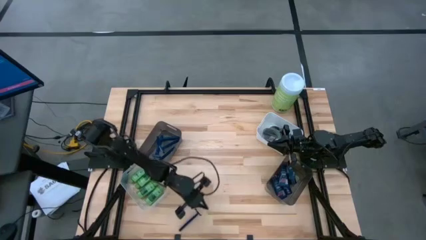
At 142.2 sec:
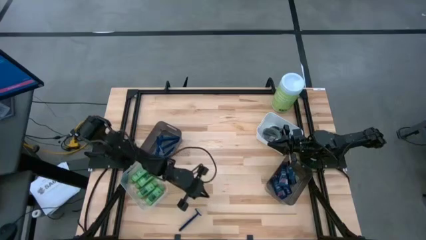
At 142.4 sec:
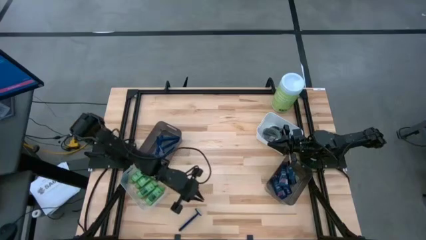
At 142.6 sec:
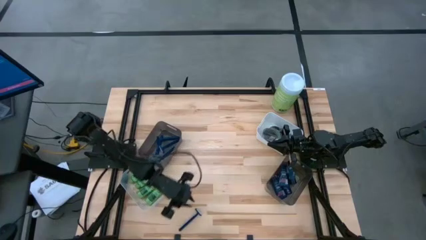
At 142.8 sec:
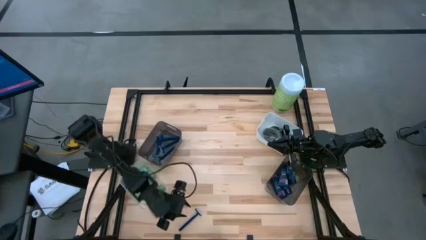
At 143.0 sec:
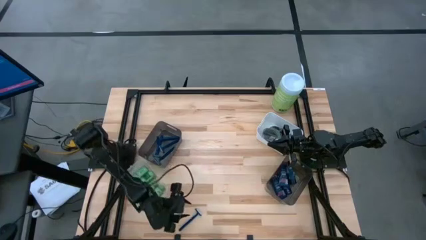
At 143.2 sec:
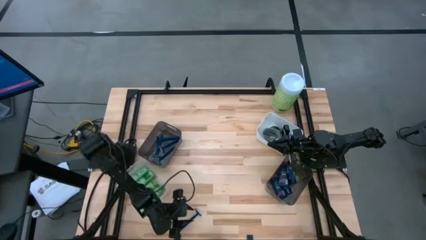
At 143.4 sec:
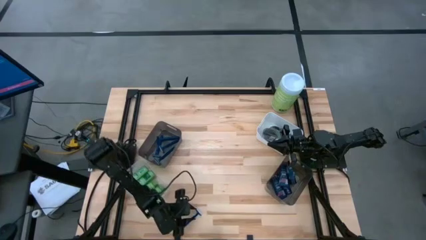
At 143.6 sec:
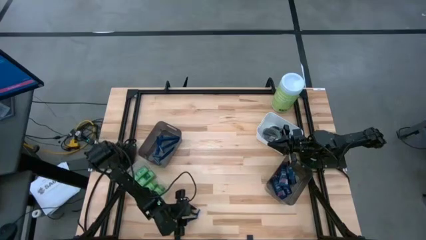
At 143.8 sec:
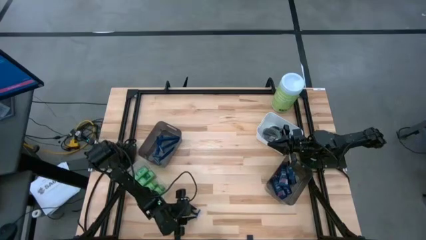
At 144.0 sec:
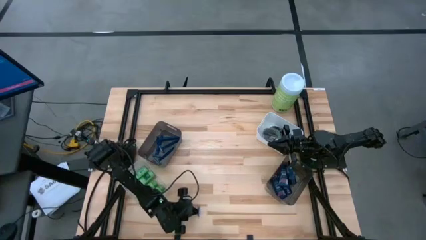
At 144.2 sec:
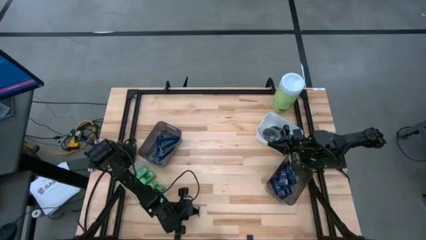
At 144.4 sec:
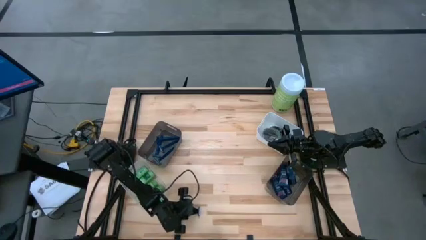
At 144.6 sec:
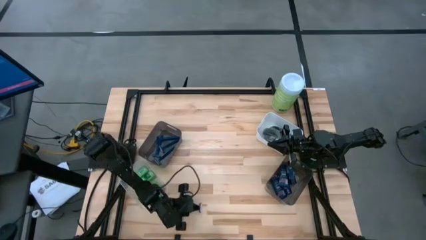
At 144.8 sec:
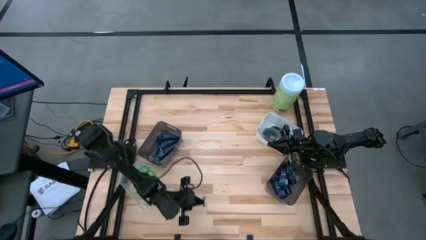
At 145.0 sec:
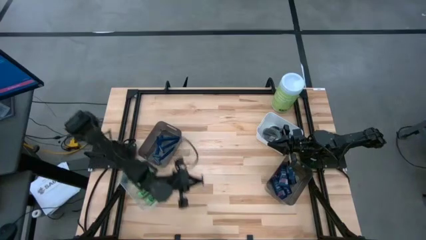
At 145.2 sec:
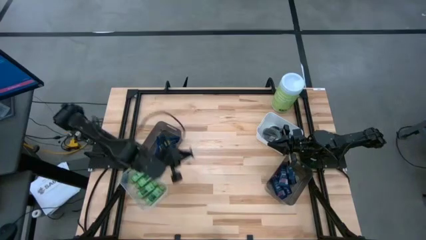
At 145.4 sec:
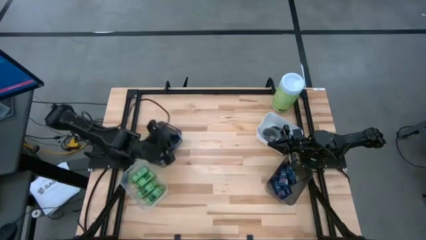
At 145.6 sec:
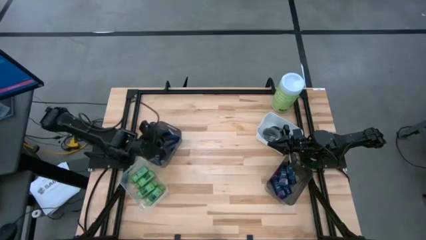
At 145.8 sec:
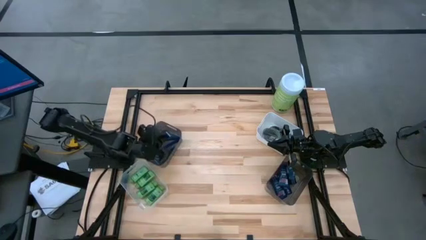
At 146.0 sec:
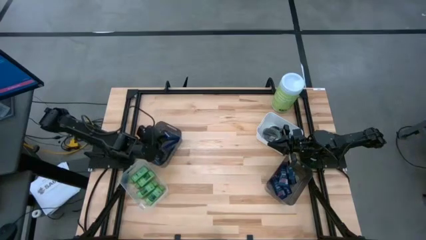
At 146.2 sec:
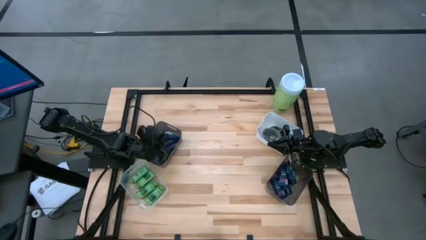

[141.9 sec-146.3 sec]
Task: Pick & Place Travel size toiletries
Put the blue razor into the left black bin

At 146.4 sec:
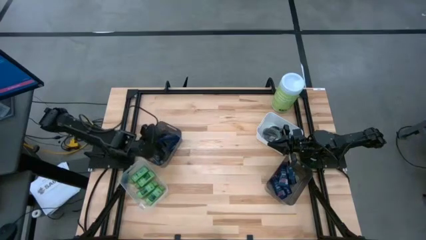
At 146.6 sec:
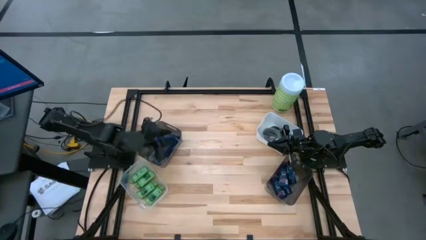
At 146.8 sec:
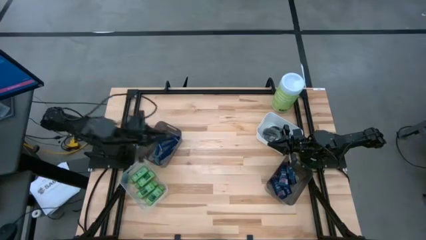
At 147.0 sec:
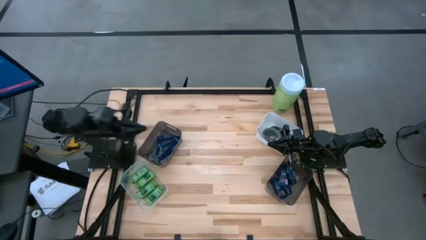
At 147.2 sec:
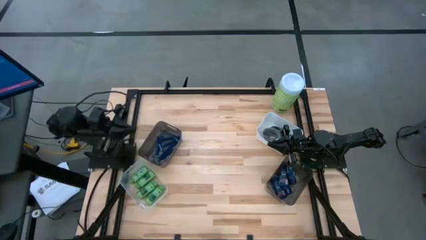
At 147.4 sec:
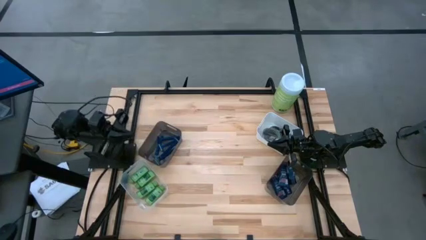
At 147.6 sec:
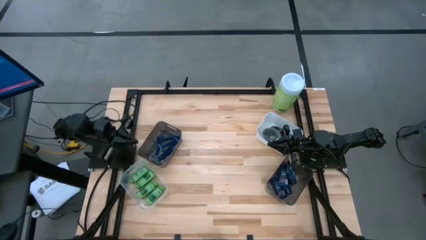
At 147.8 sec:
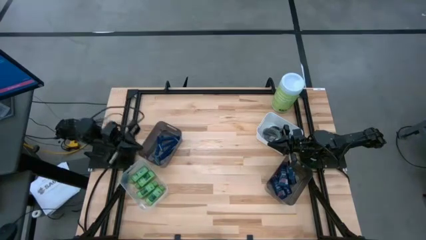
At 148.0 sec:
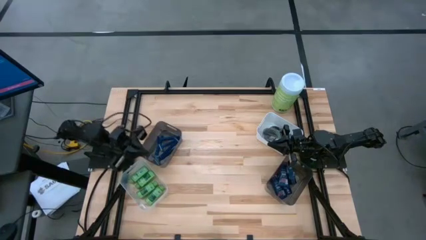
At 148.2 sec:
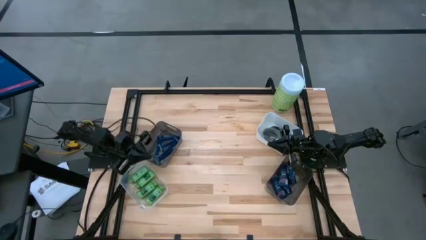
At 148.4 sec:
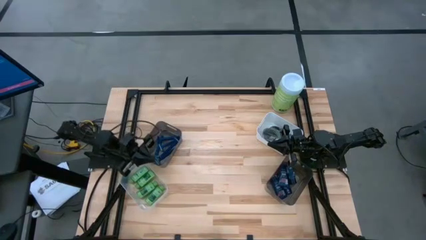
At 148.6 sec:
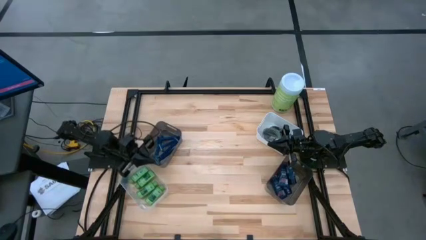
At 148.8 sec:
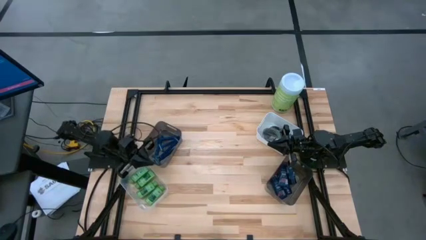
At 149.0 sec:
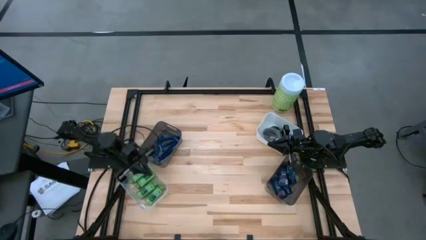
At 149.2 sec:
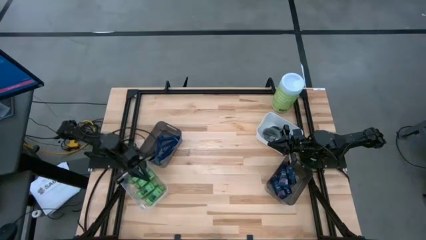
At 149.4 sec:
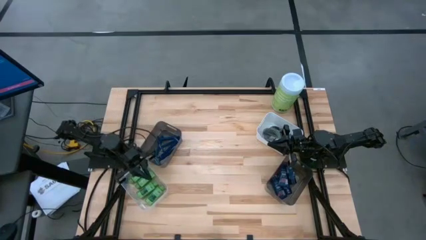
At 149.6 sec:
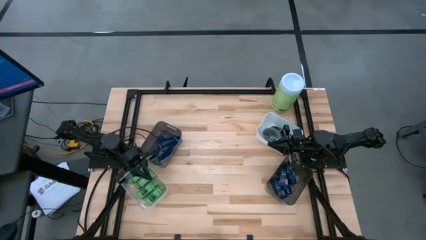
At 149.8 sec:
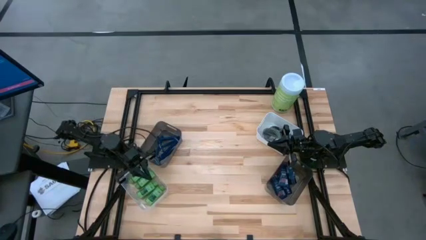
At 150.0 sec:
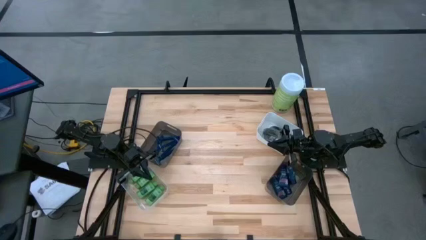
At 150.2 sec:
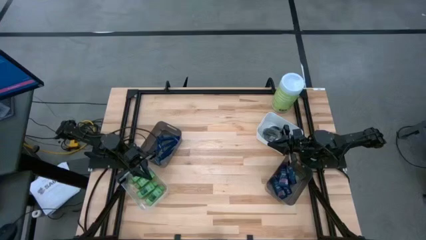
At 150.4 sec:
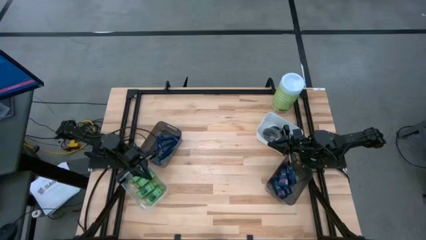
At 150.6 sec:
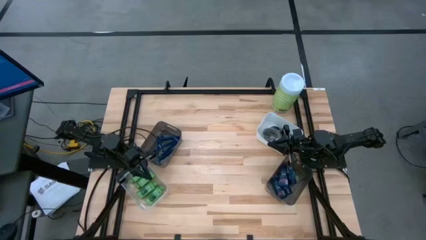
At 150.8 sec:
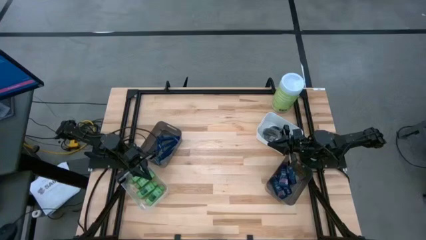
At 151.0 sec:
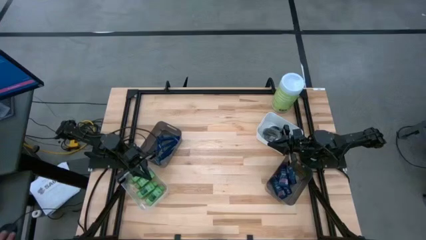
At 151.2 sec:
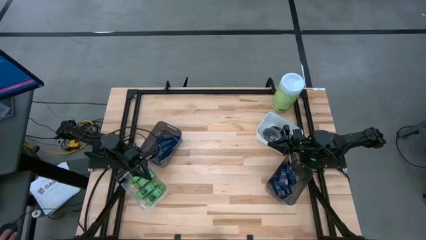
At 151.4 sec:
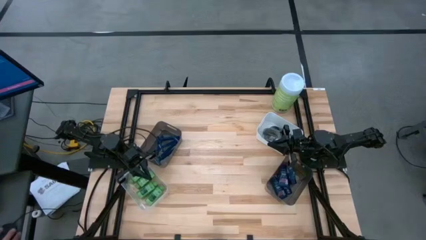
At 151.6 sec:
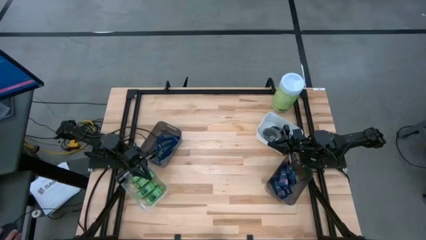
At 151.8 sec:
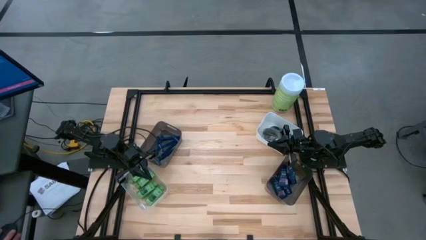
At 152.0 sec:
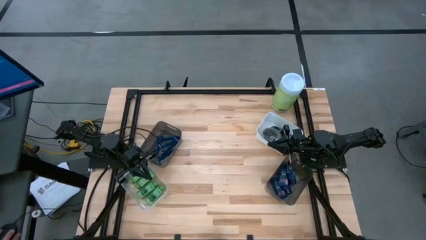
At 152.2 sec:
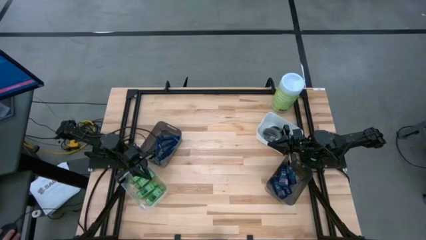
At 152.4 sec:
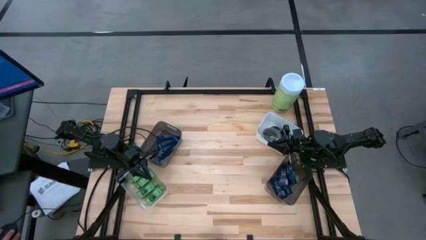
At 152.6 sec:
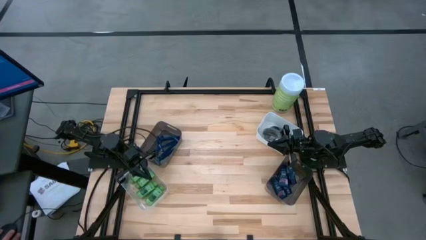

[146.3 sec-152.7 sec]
Return to Home Position
